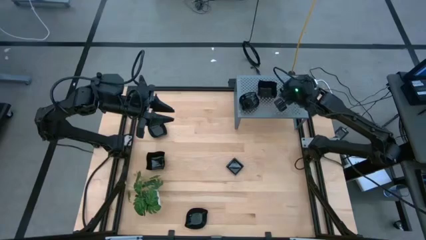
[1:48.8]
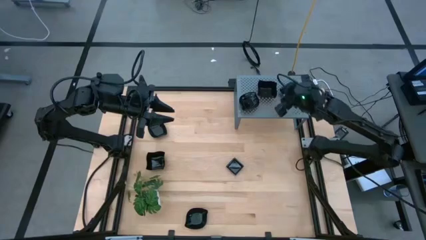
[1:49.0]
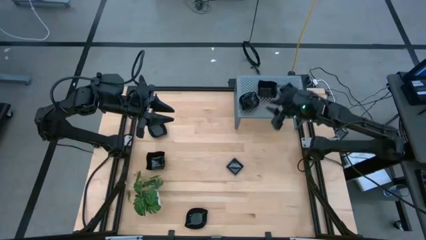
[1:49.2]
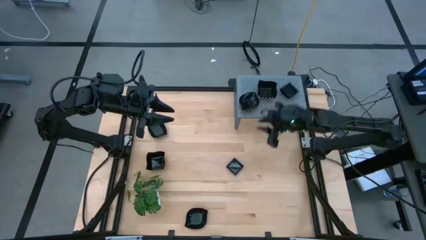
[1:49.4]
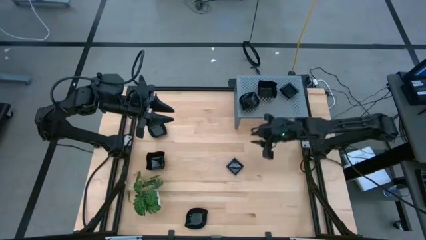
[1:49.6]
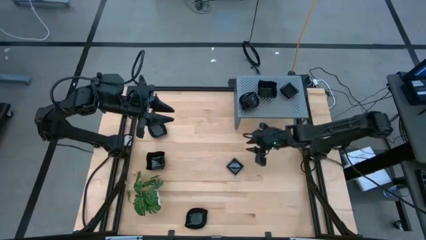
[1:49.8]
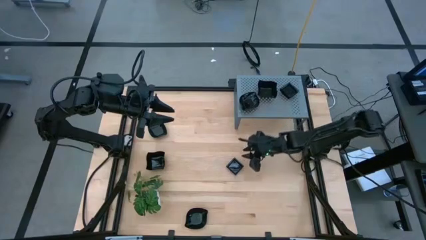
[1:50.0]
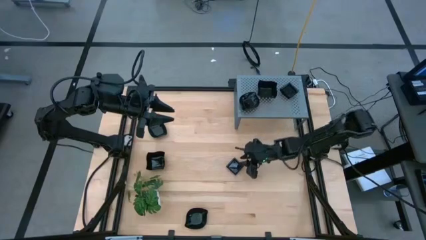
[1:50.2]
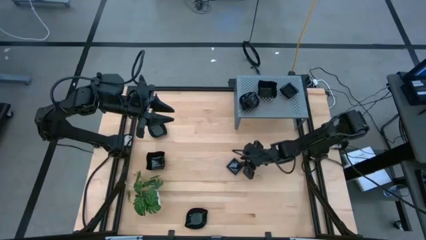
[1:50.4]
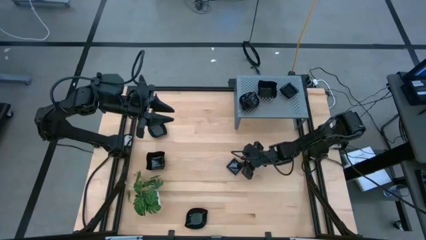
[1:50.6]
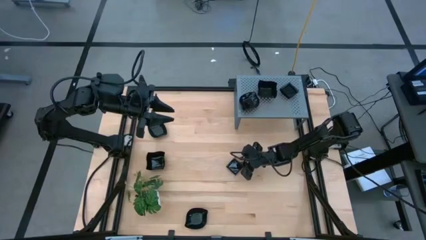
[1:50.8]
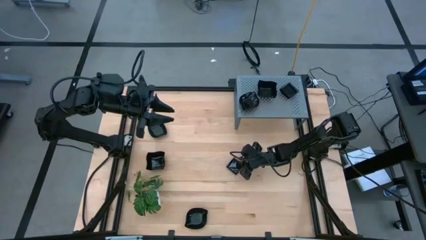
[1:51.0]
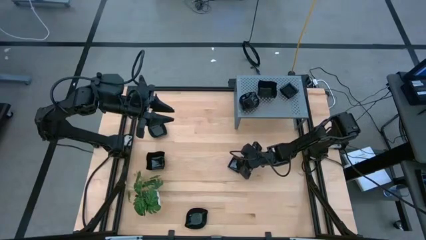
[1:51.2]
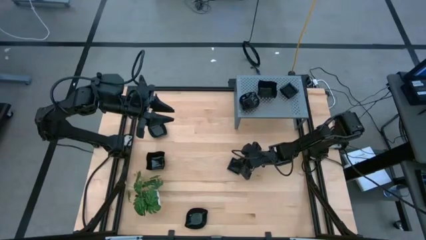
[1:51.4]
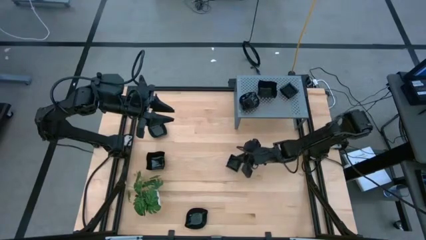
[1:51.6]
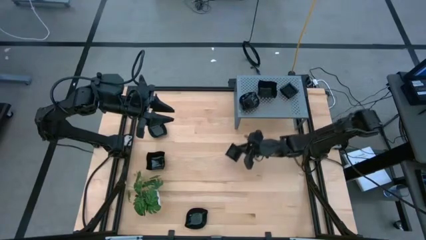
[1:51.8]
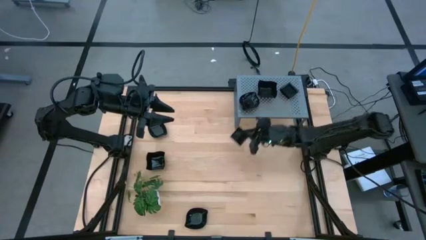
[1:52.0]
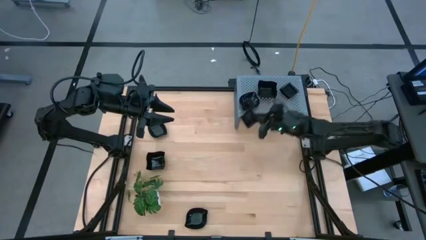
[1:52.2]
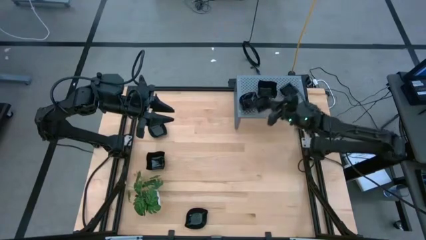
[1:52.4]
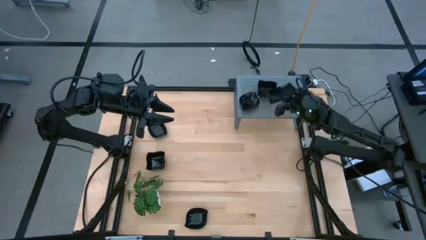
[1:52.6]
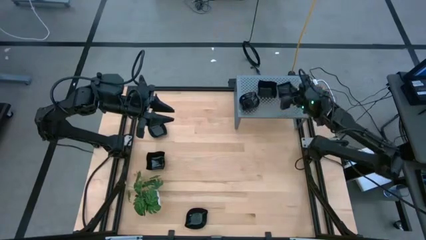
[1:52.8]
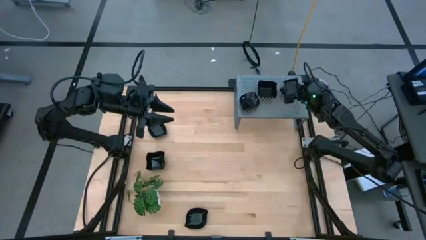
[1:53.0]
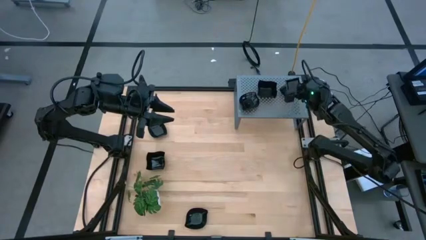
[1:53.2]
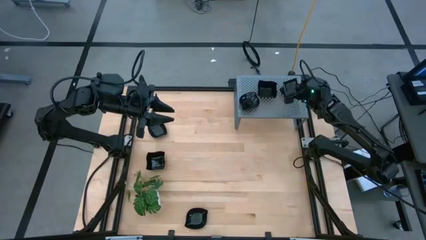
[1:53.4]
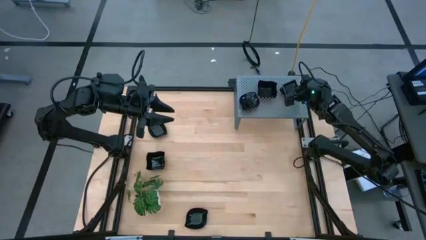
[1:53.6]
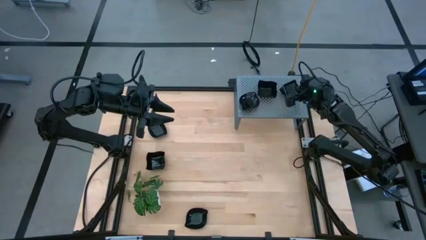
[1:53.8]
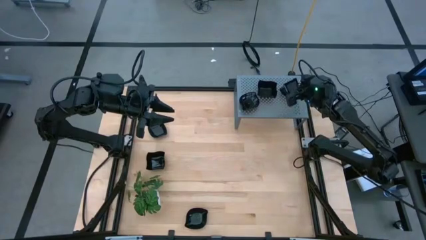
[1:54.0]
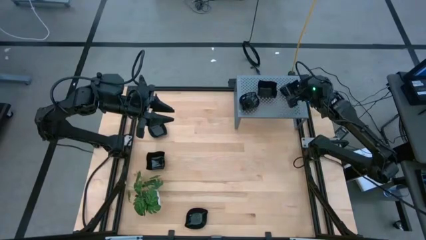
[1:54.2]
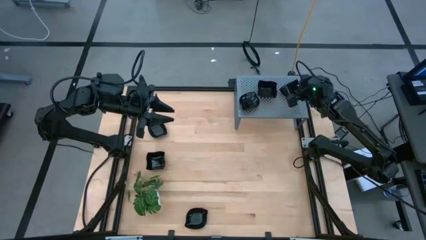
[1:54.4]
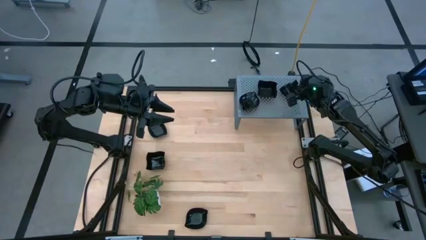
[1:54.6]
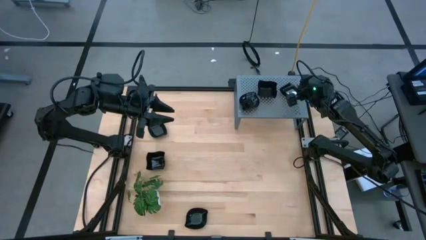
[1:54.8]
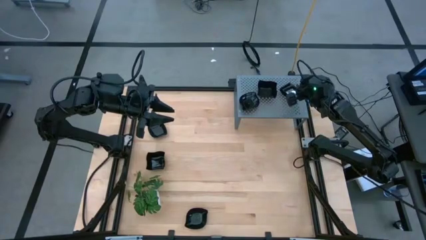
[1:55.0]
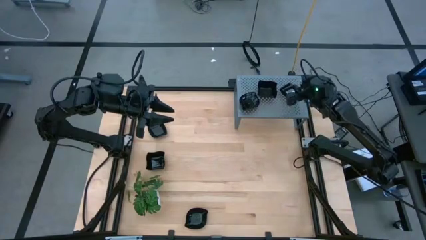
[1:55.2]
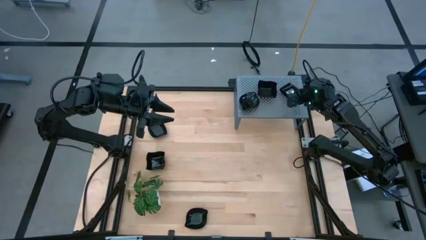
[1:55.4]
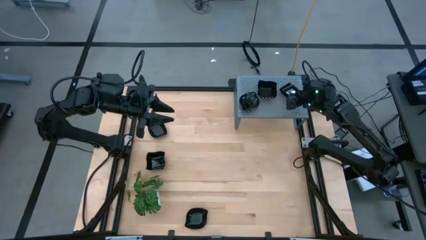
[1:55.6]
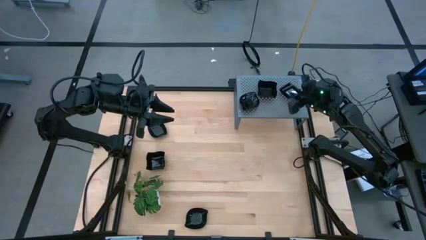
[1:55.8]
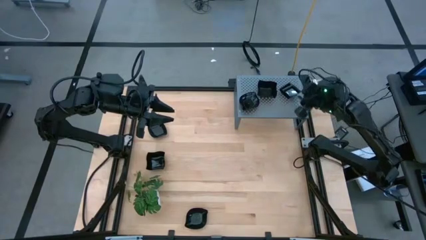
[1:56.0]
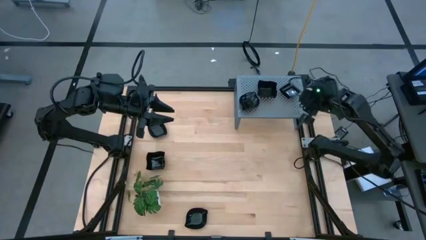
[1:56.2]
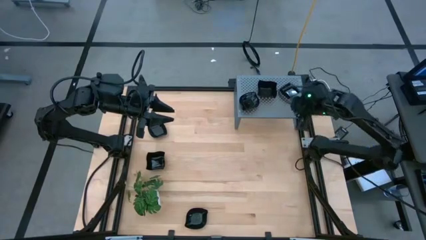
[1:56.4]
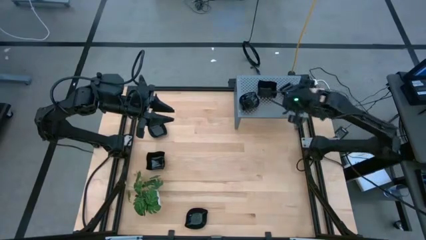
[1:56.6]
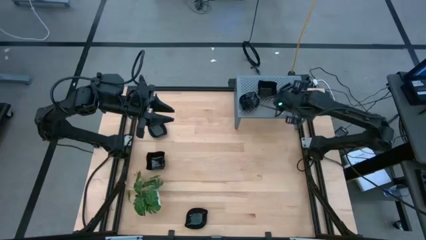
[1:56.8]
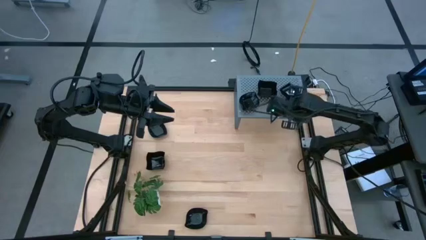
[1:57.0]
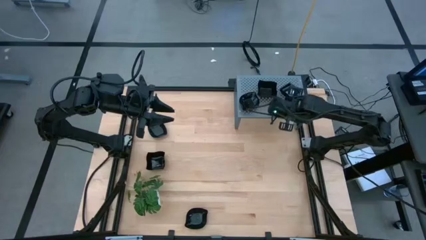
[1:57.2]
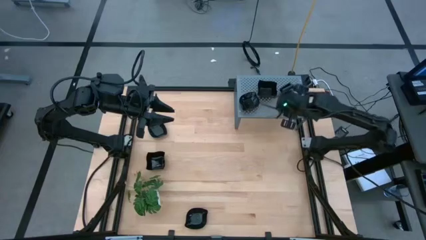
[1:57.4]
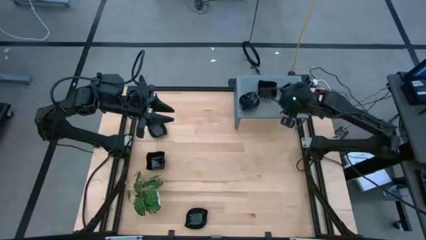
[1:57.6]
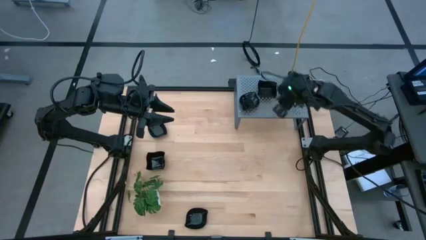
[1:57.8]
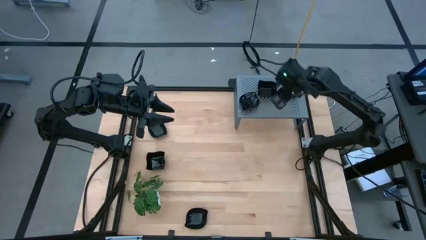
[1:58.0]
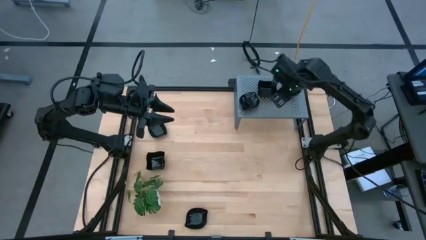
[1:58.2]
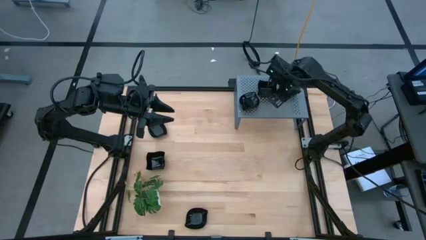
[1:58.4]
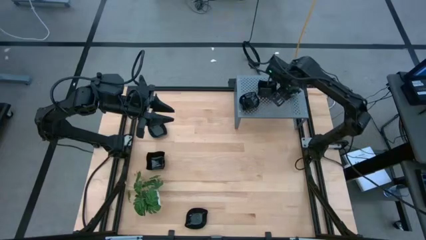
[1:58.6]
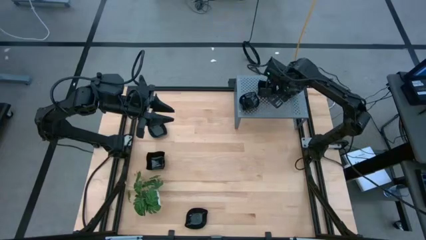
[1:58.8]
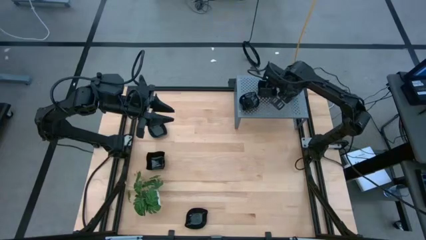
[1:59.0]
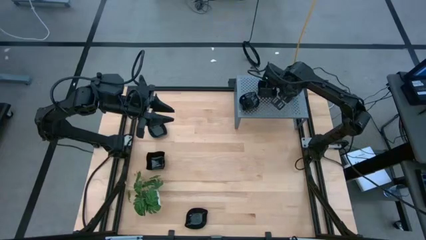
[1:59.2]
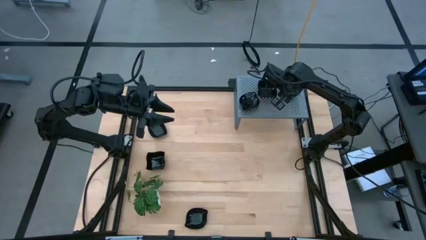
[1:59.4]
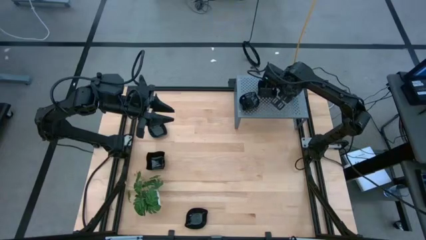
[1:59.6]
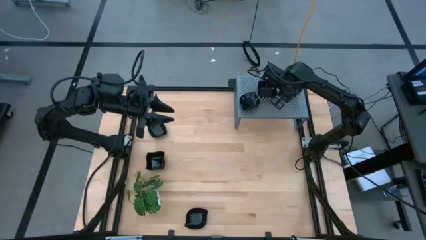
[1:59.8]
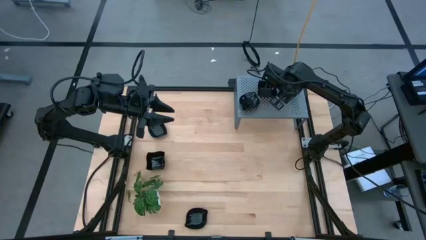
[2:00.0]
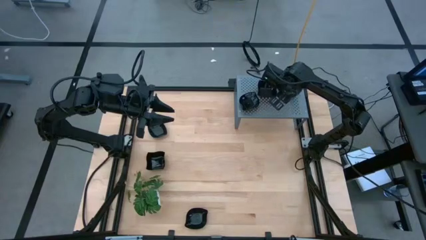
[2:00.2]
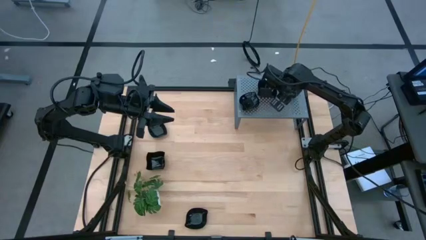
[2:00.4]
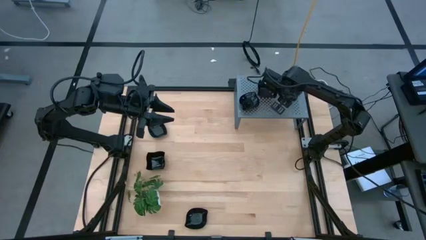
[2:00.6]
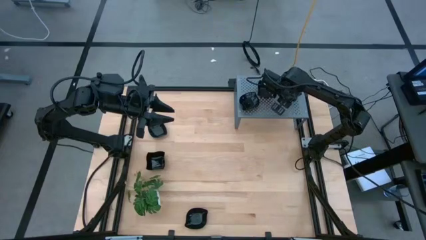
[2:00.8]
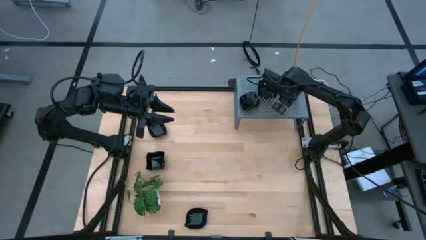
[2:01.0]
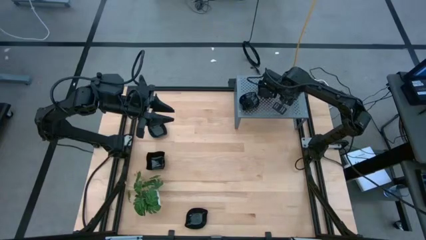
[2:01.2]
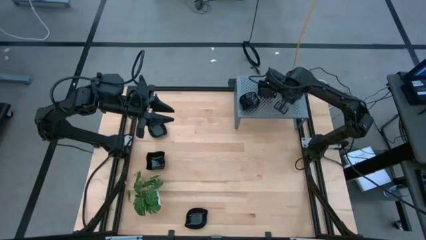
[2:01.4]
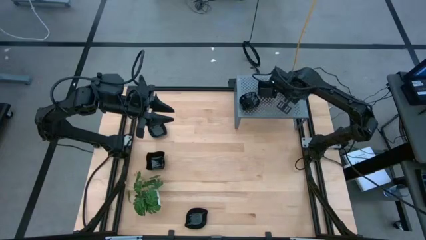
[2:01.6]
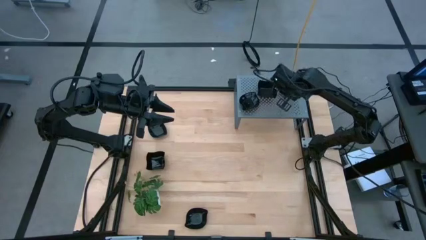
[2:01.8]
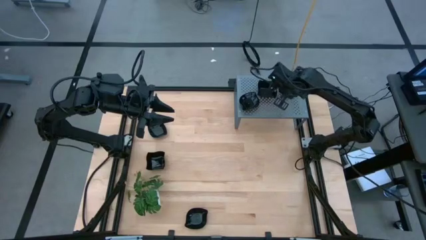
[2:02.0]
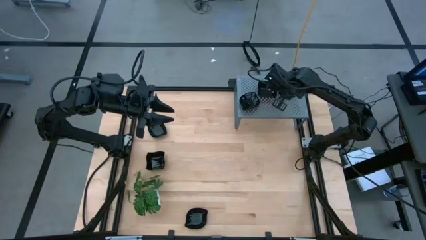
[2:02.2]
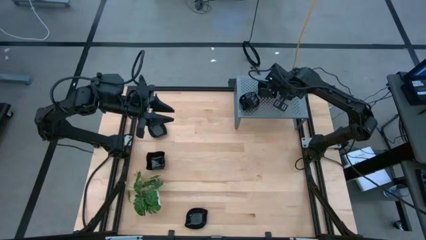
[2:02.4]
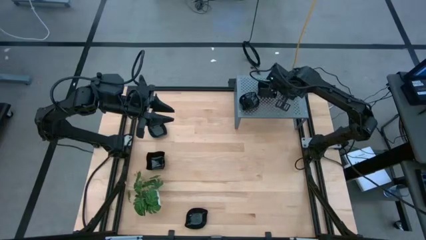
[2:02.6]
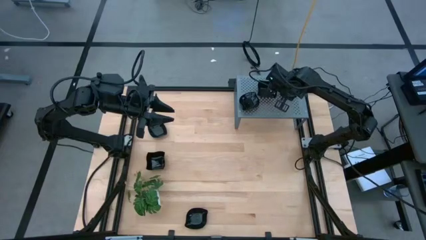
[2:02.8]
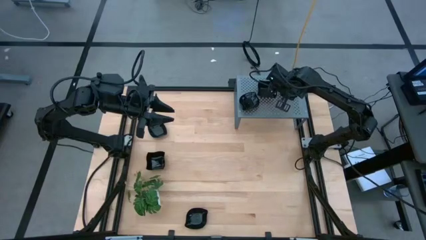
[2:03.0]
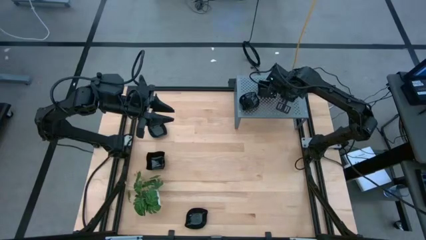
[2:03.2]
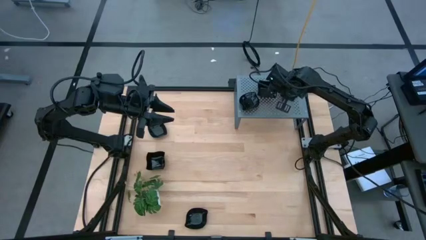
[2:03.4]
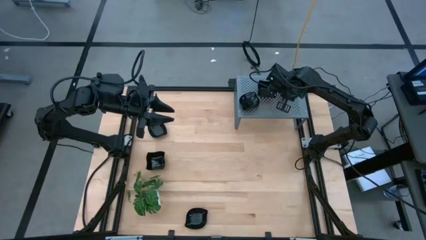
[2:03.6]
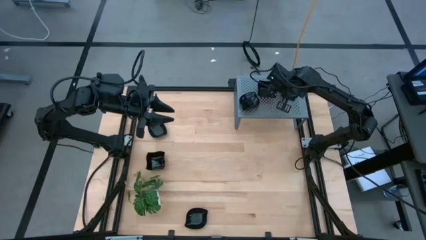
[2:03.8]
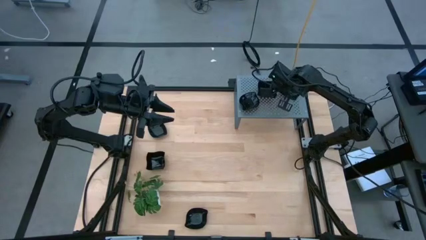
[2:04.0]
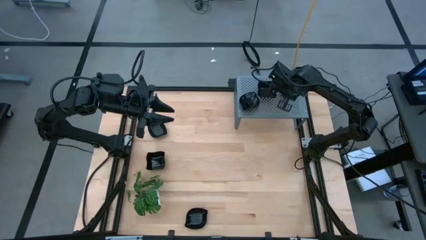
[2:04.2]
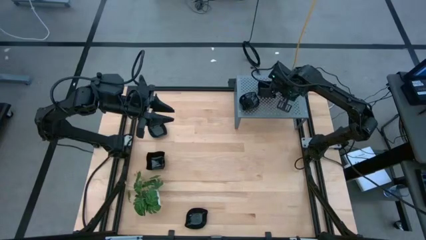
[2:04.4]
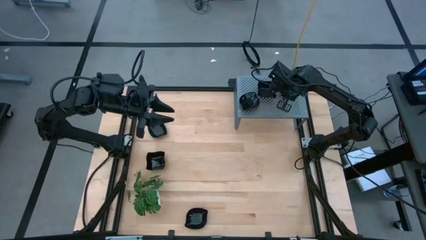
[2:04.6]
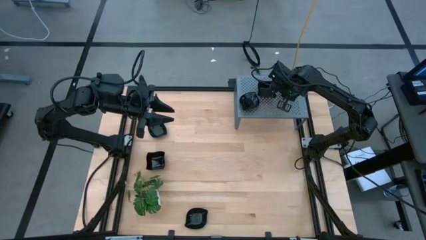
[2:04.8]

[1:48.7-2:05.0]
Task: Pick & Place Mini shaped plates
Stack the square plate on the square plates on the shelf
